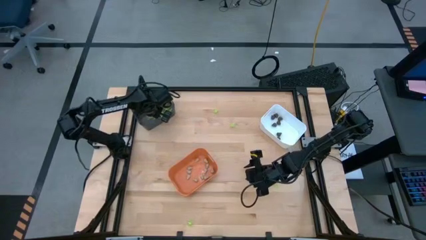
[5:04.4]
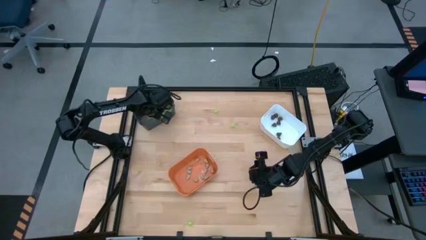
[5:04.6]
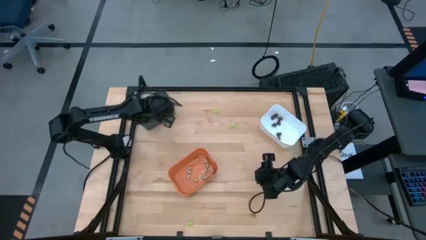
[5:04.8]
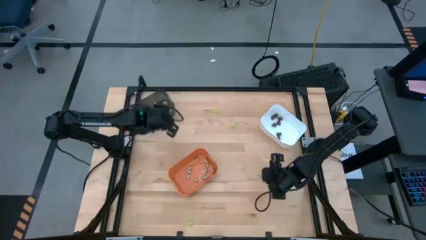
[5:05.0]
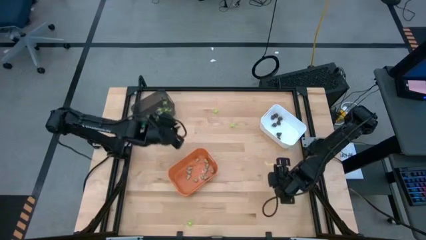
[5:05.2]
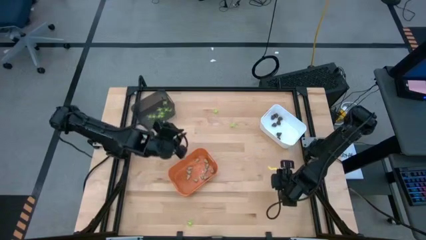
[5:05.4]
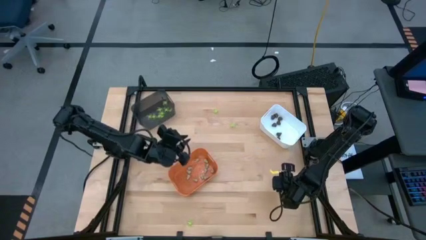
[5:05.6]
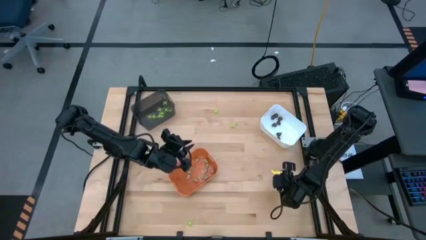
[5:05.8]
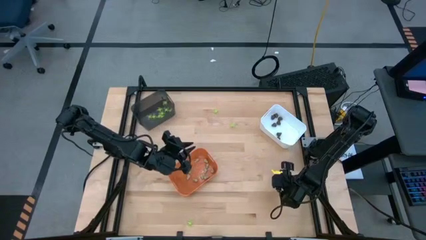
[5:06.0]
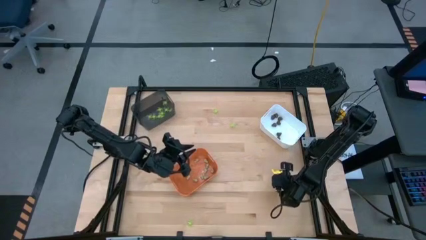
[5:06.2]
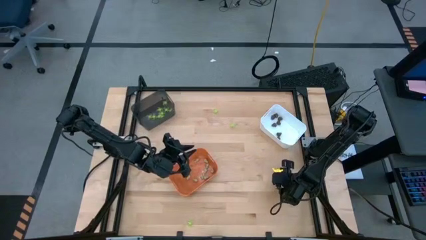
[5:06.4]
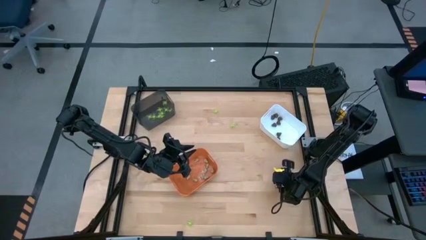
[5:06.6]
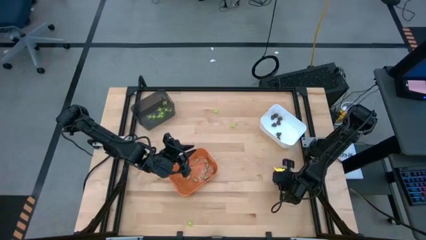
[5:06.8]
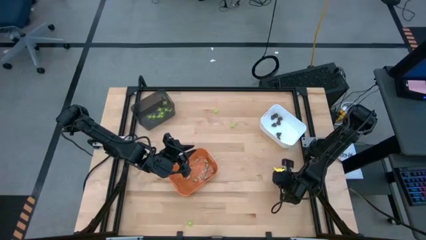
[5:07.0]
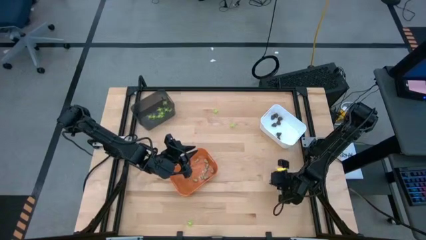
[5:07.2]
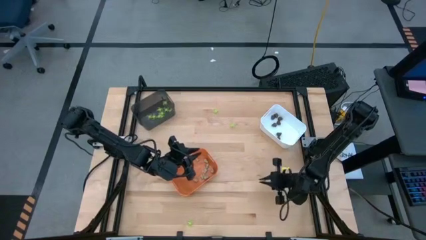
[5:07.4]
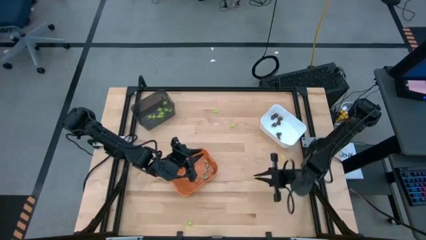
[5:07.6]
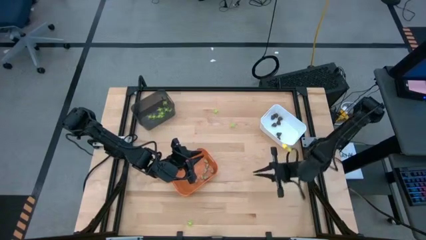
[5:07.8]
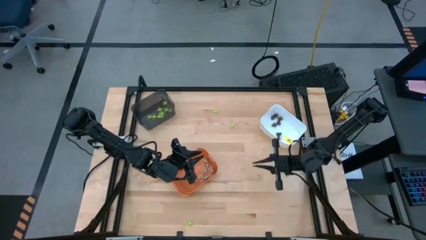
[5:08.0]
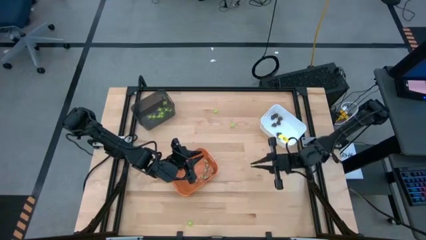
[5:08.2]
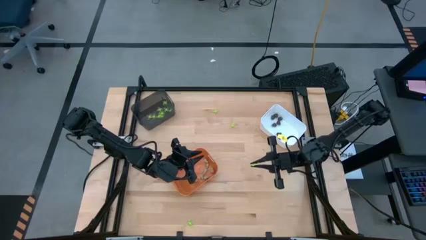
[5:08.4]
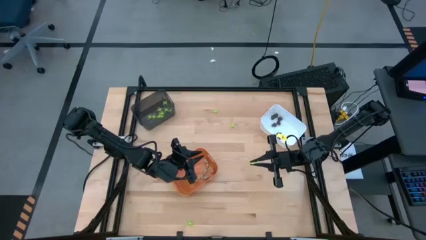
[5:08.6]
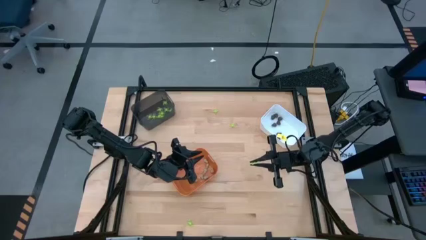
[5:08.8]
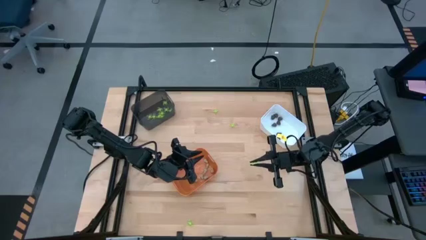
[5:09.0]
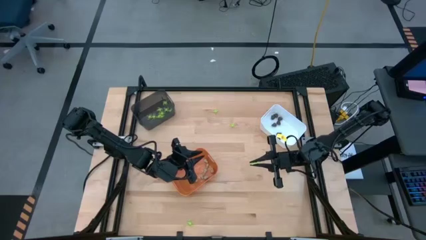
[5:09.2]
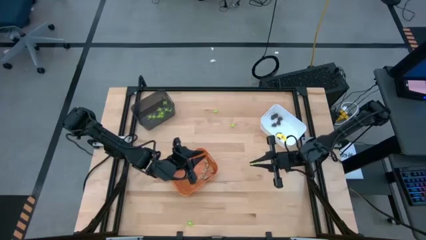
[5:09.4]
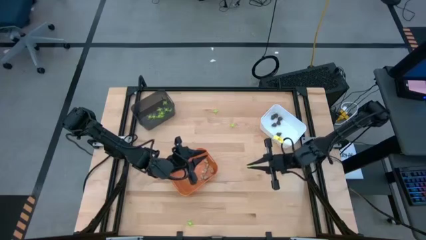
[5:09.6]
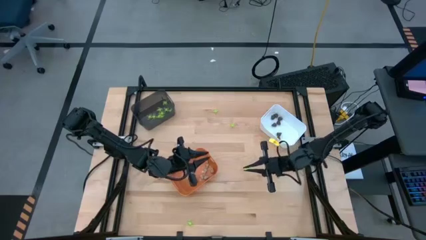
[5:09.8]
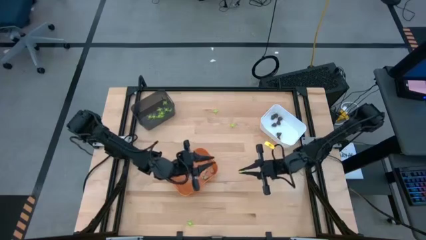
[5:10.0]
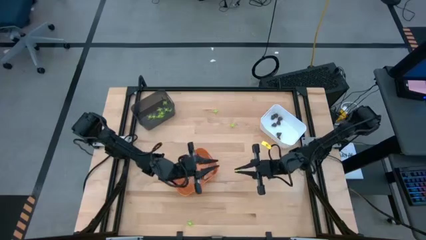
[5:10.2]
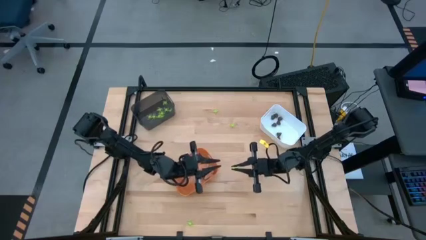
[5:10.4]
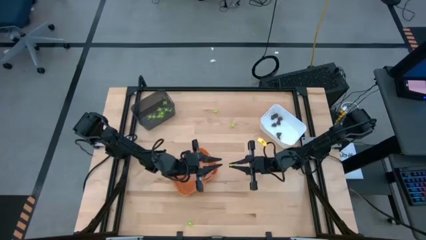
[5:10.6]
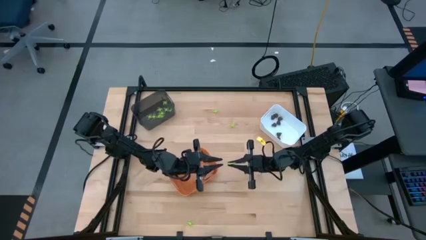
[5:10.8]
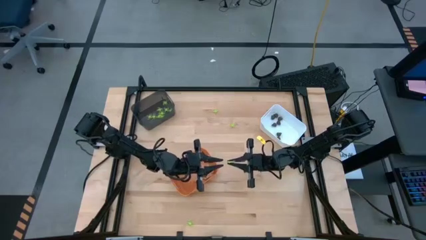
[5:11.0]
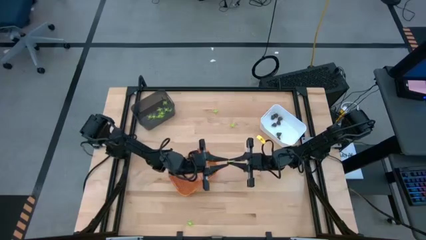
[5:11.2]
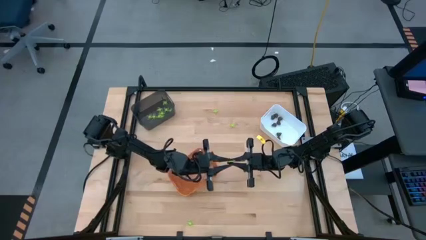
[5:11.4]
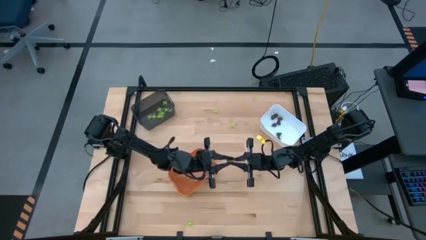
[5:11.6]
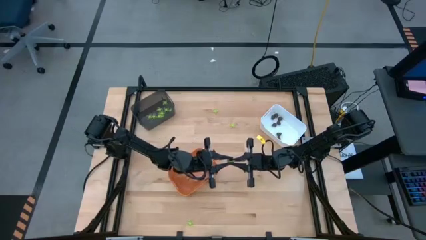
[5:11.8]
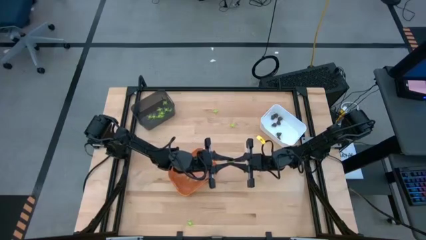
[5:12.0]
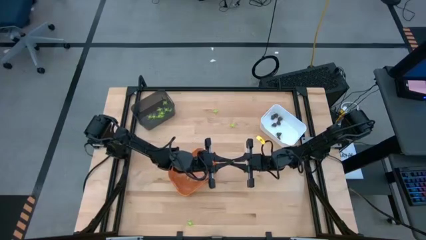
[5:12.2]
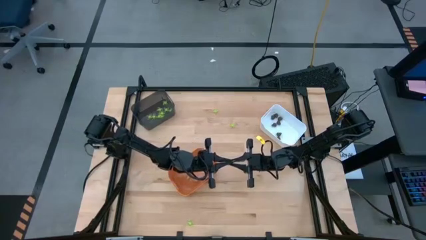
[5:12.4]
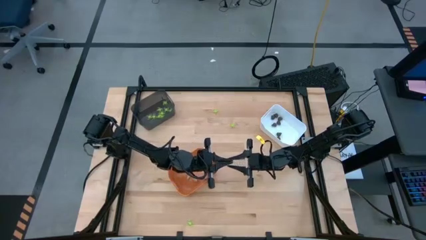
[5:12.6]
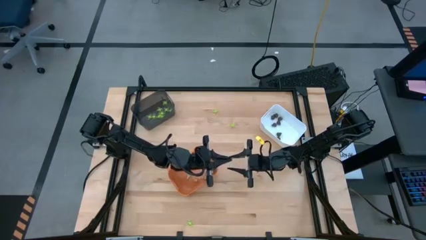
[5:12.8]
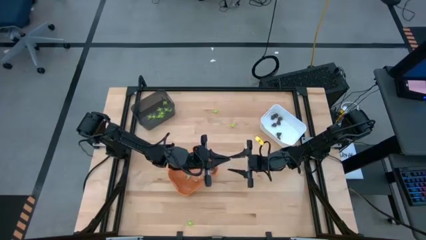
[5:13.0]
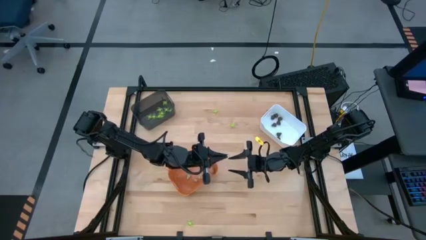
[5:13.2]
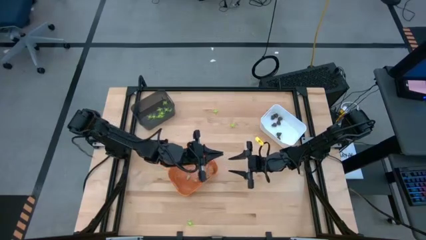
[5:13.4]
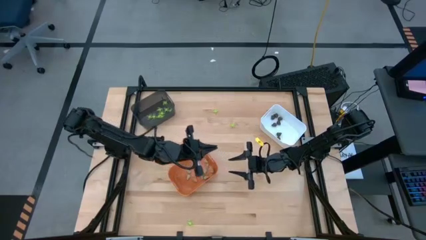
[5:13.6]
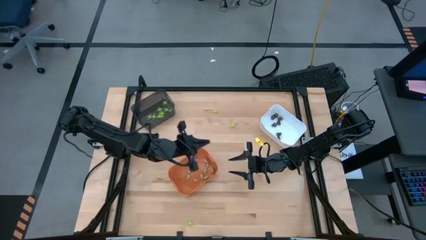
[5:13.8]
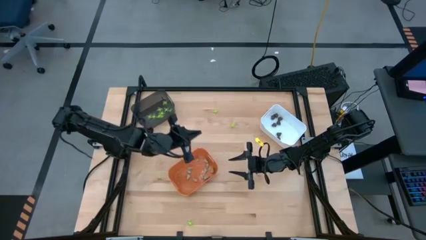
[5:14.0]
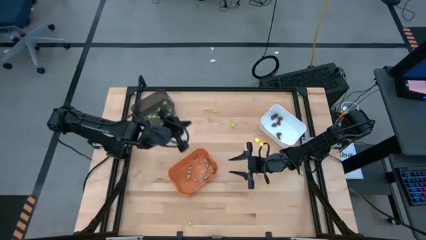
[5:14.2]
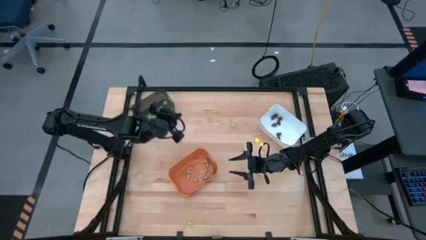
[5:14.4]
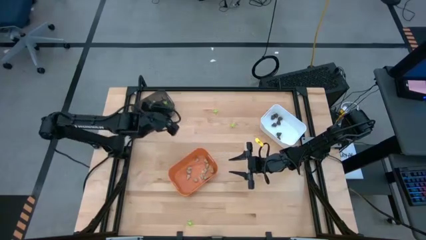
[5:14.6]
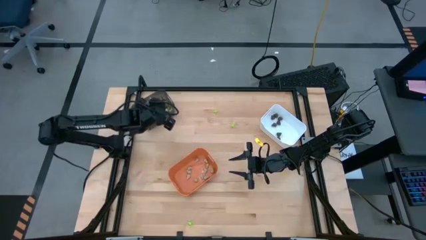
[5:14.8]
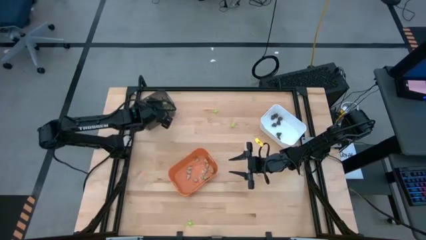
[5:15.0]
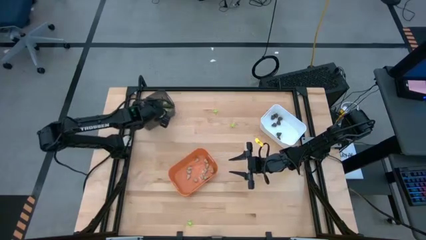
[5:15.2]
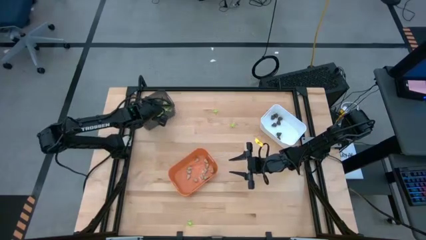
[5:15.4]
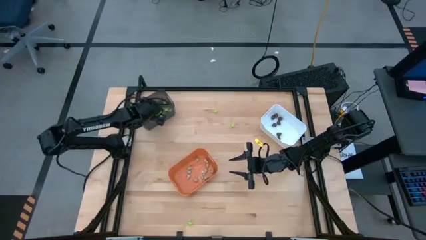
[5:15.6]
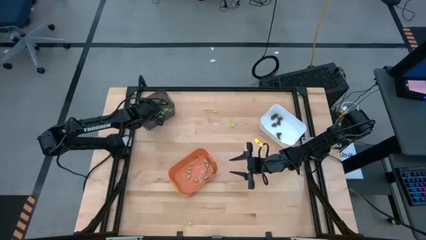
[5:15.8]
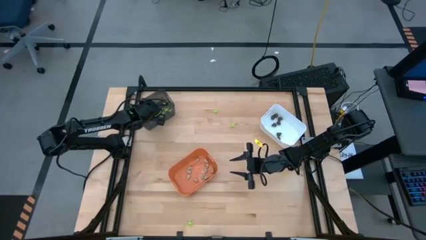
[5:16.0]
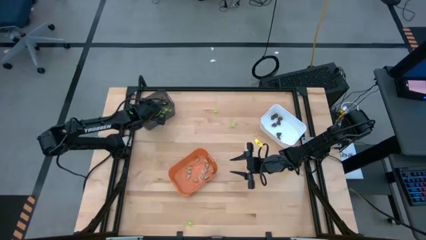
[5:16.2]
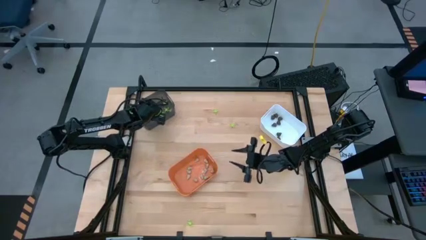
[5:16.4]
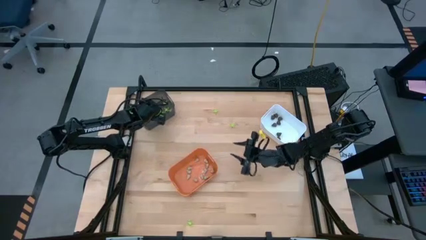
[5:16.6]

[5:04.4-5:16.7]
Task: Sort Halloween decoration
Put the green spider toy into the black bin

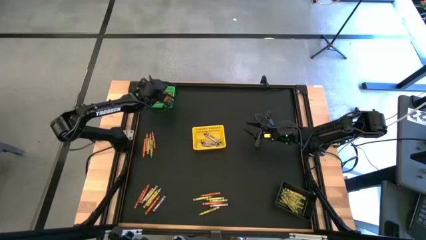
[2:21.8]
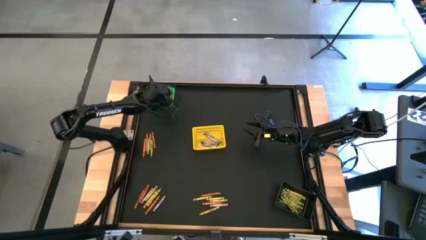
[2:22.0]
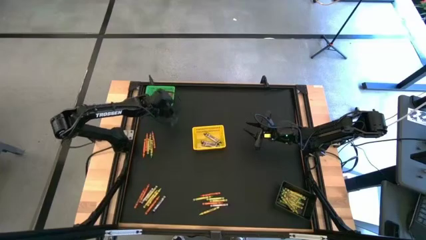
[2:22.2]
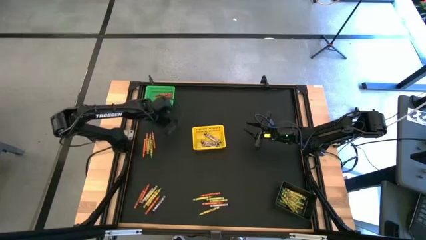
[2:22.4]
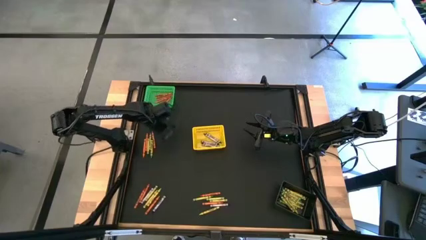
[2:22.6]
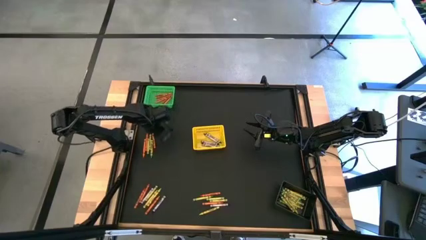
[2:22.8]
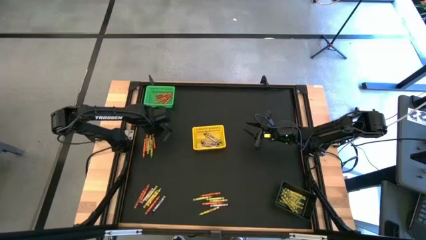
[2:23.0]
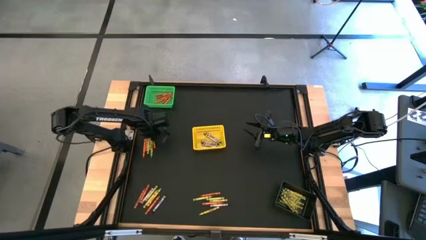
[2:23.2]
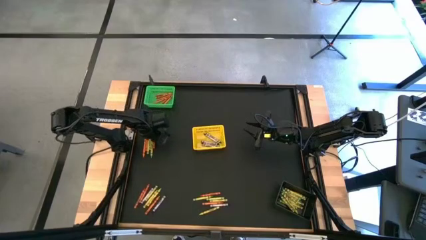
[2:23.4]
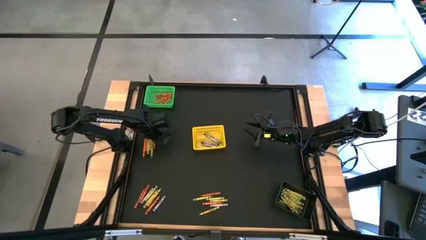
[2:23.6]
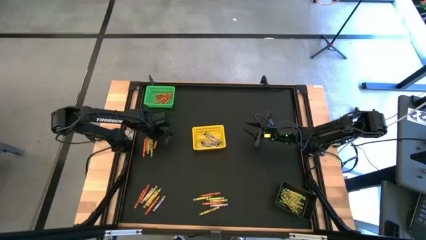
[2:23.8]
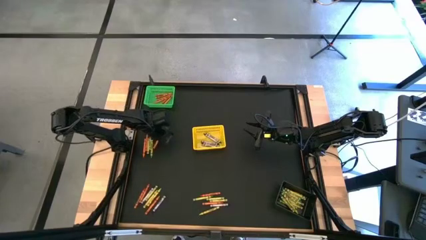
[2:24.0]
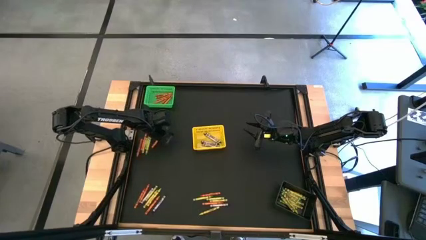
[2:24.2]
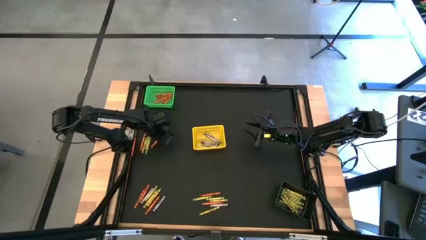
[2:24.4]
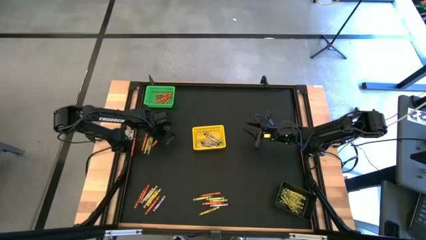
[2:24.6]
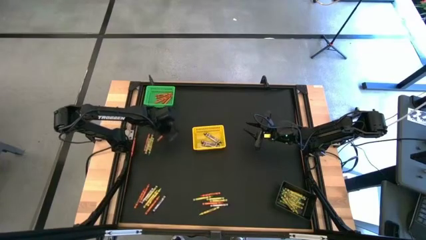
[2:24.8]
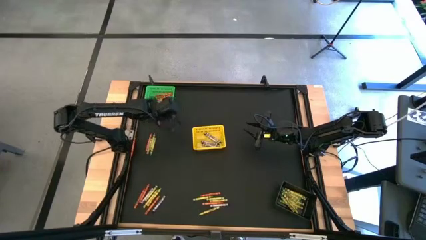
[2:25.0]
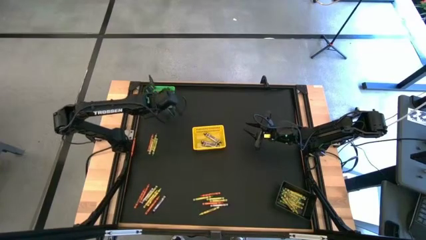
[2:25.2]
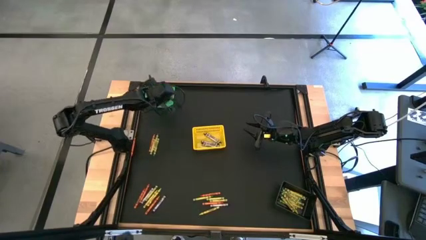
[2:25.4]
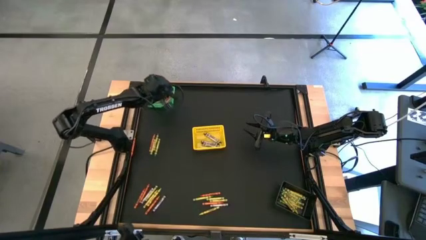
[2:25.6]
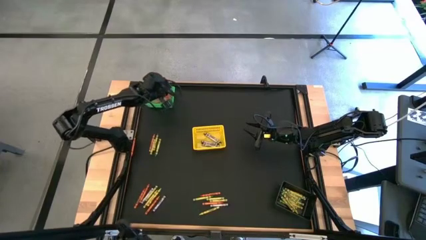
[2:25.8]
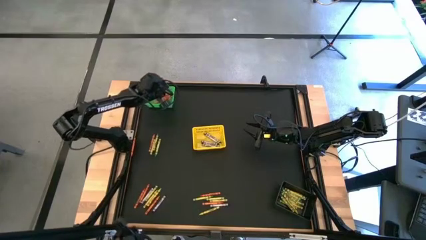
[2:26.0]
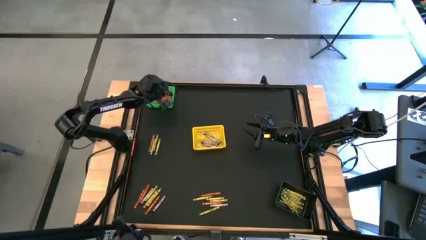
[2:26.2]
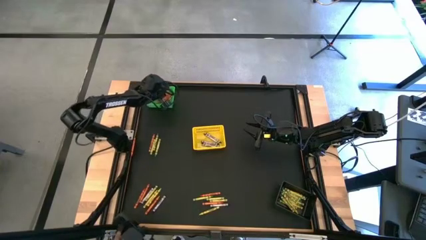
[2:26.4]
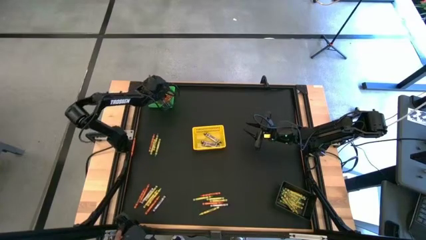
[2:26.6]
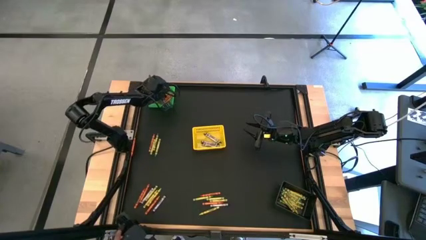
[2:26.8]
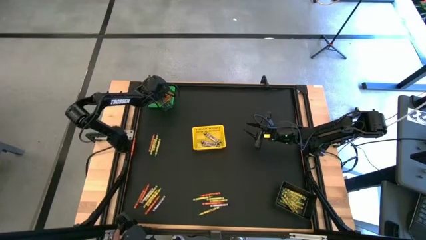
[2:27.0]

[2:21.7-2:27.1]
Task: Sort crayons
Put the orange crayon into the green bin
